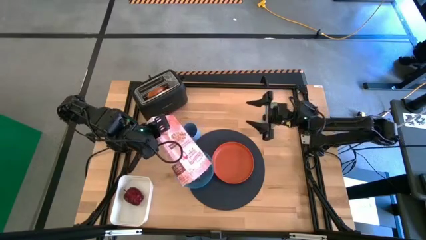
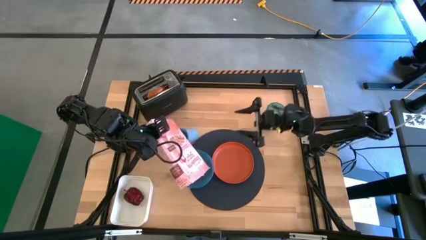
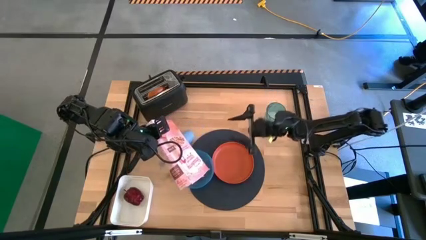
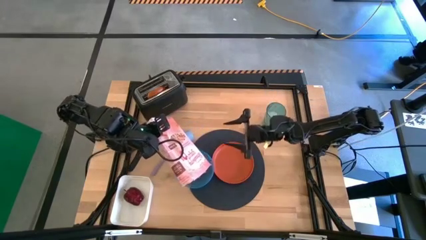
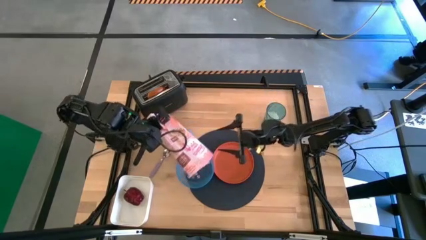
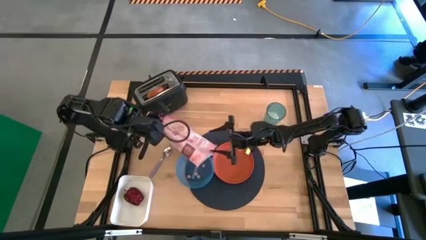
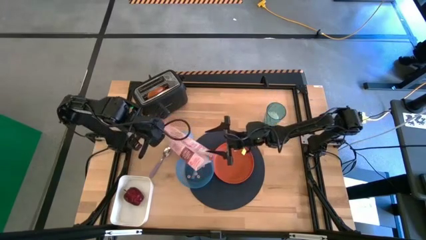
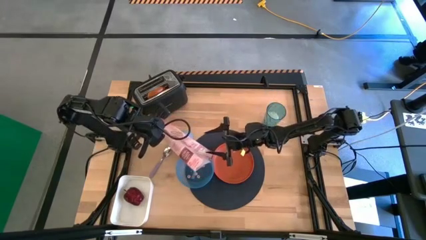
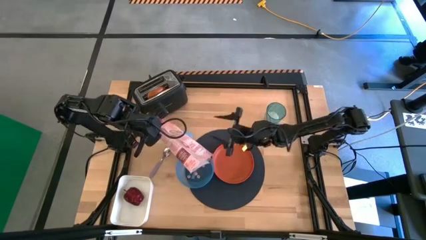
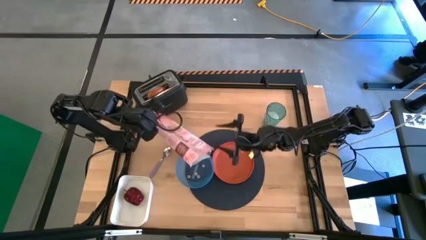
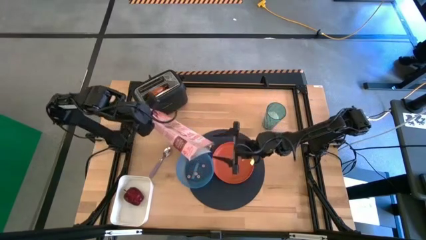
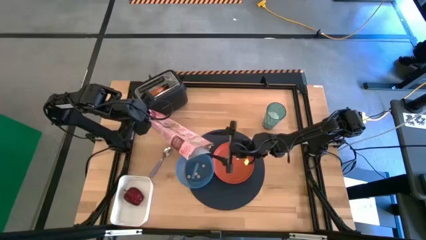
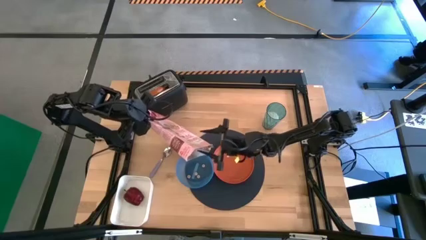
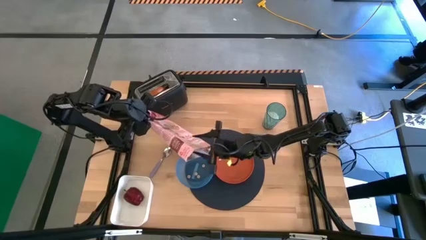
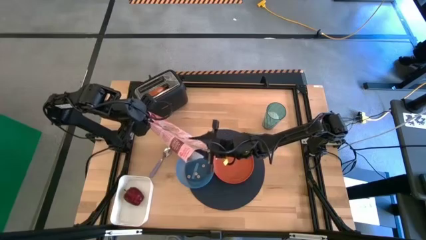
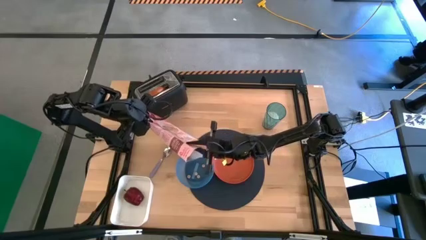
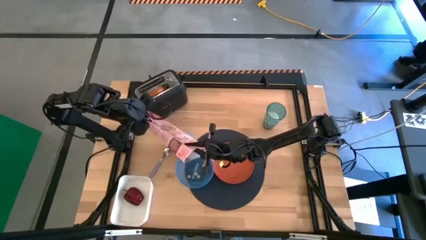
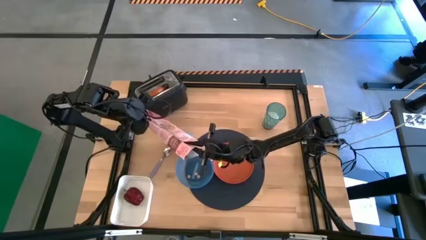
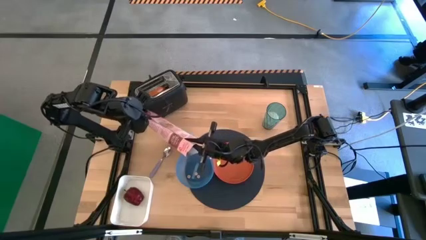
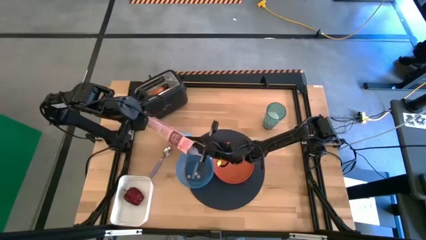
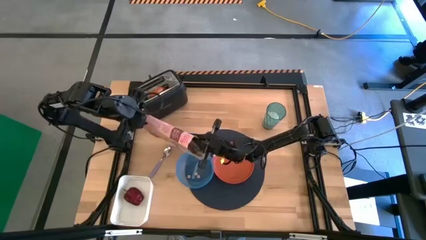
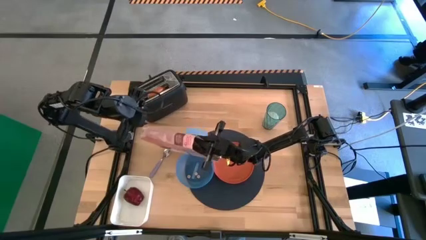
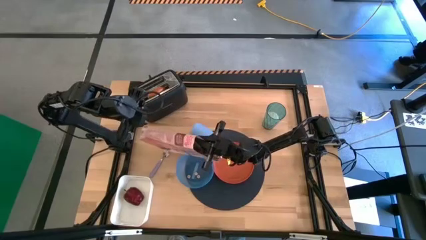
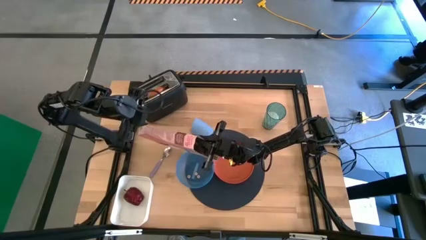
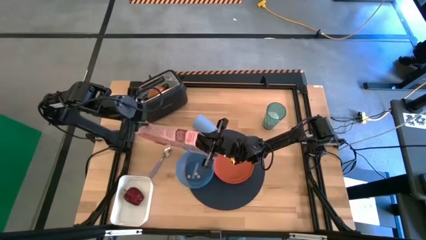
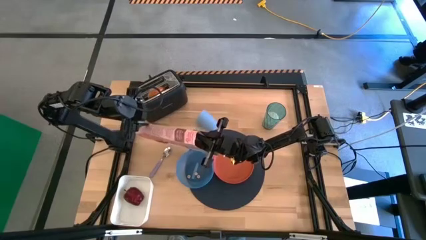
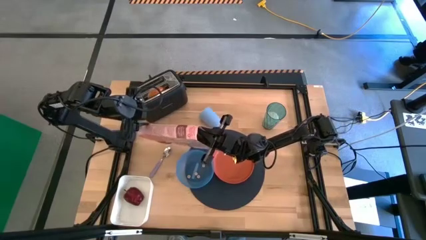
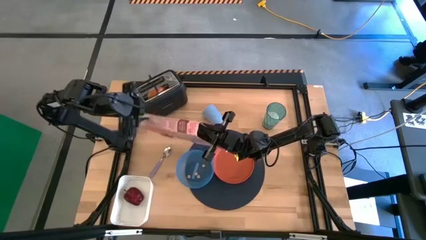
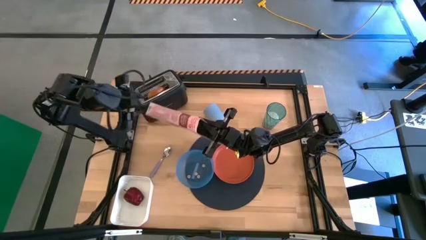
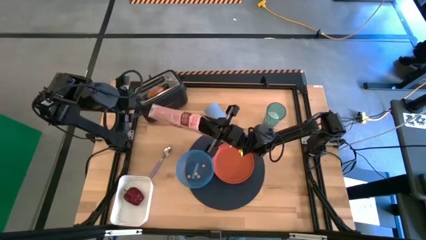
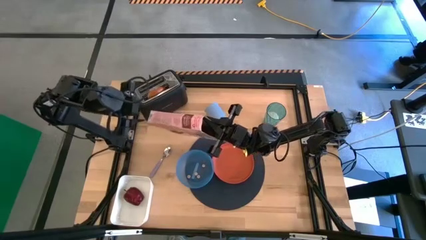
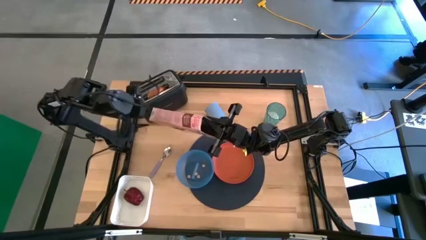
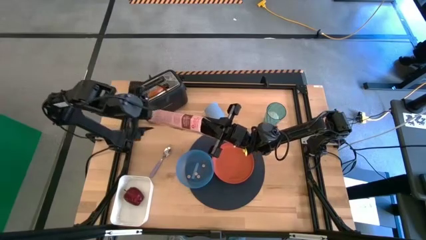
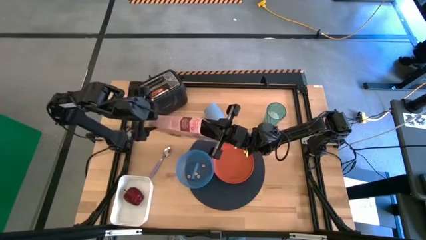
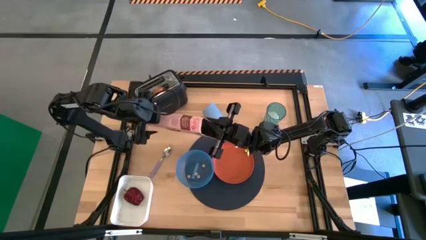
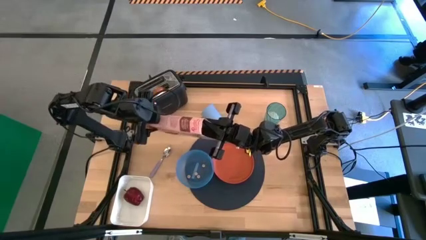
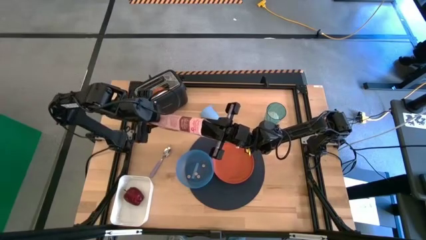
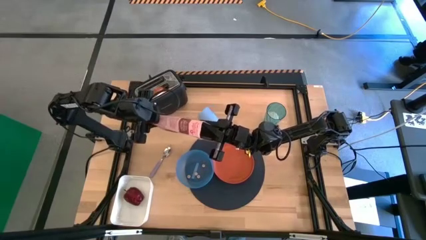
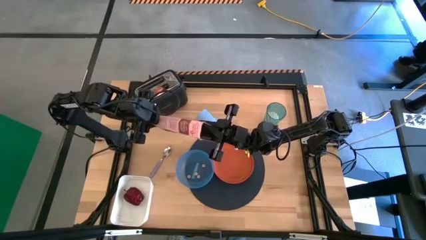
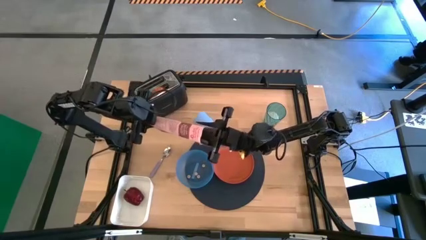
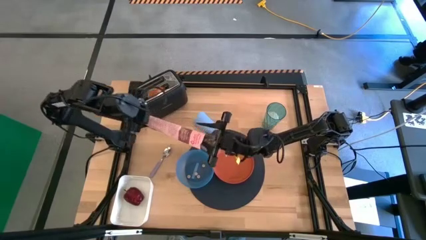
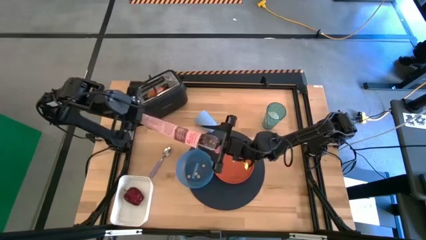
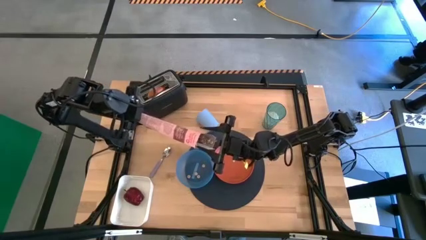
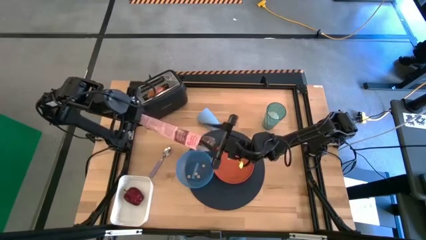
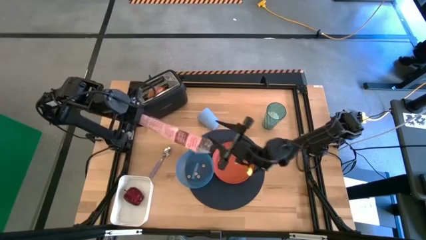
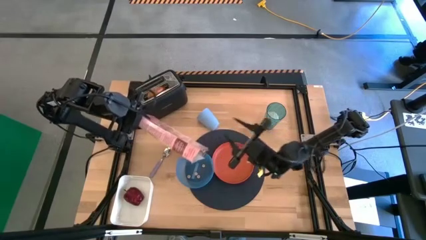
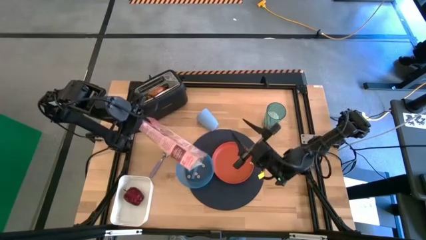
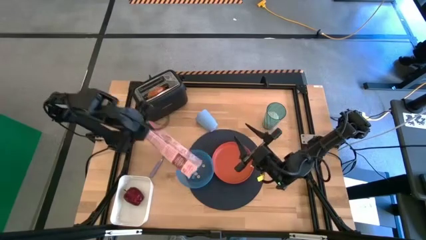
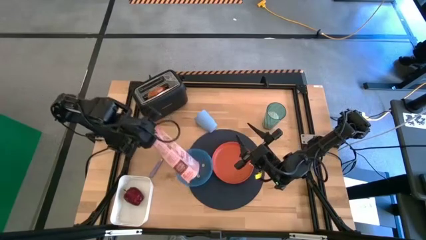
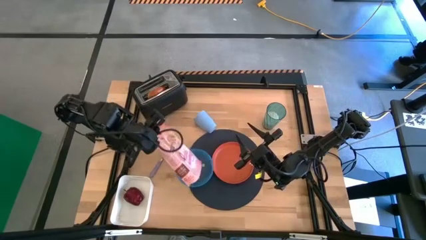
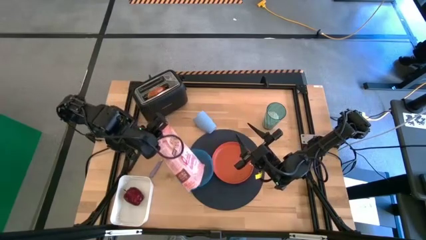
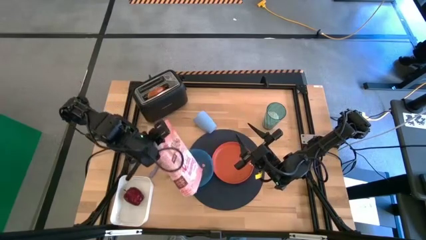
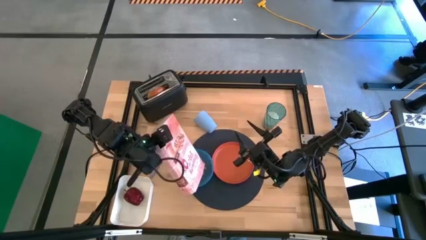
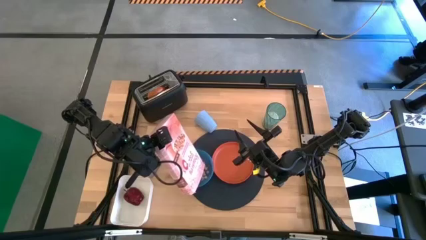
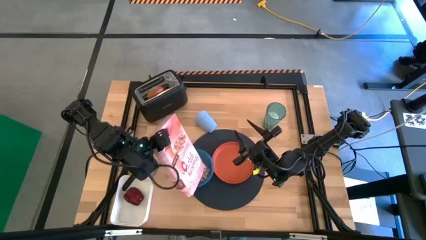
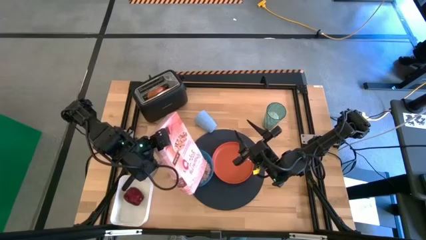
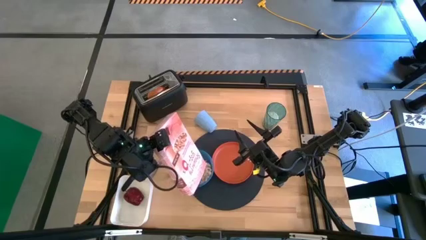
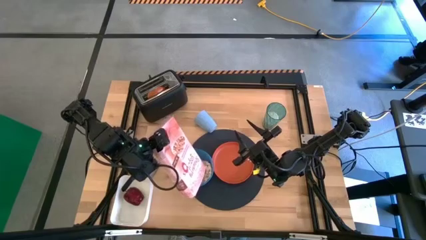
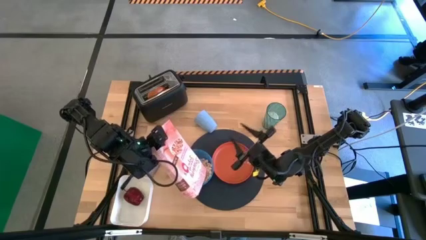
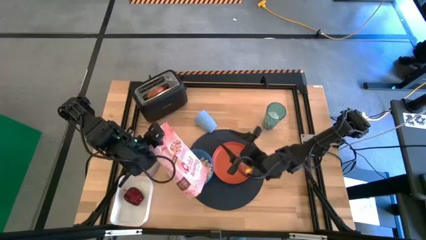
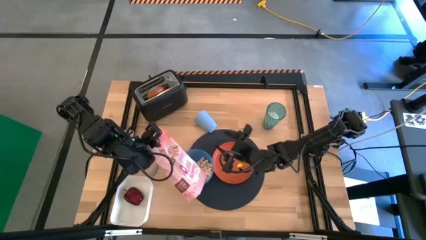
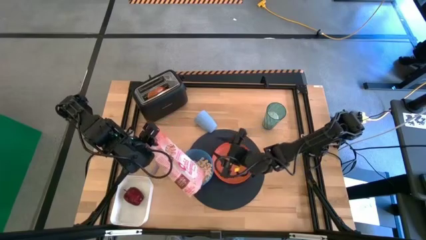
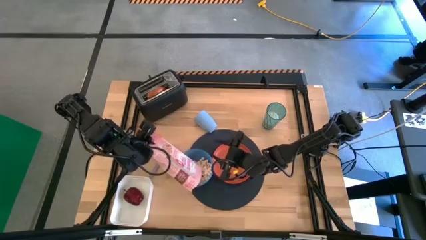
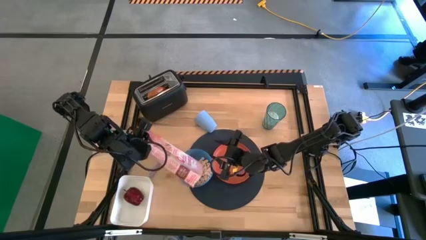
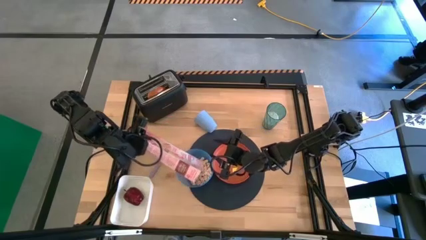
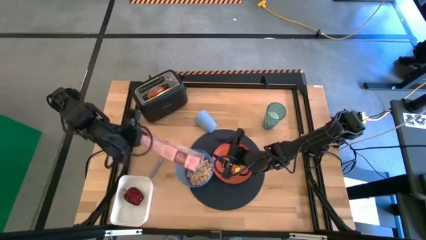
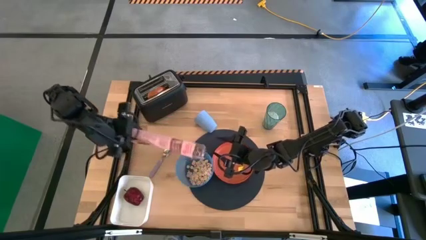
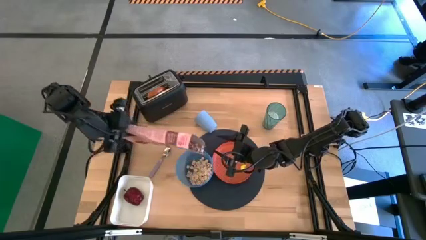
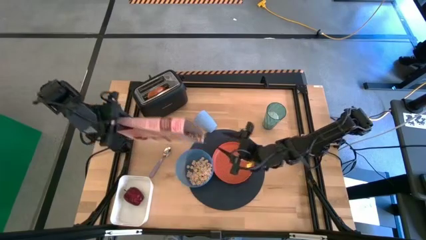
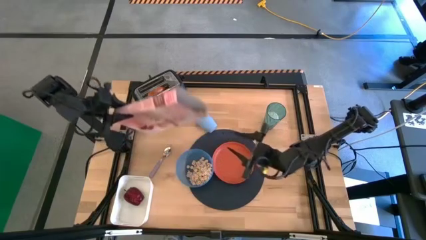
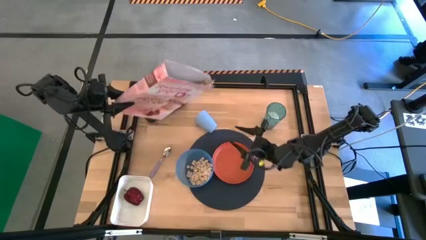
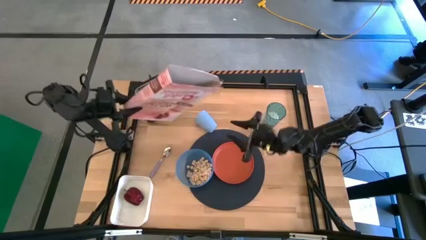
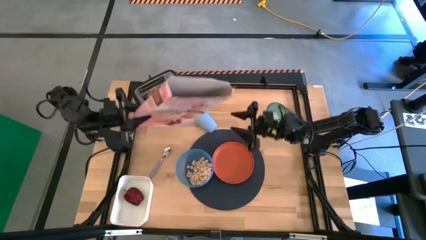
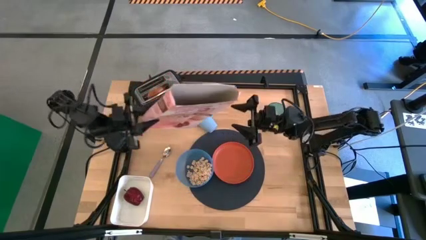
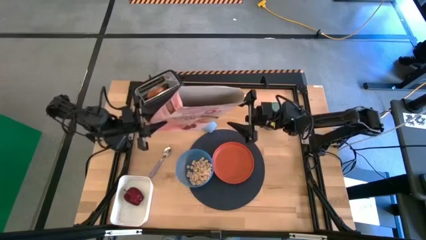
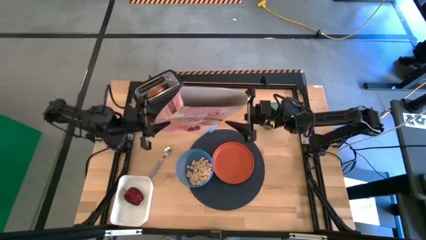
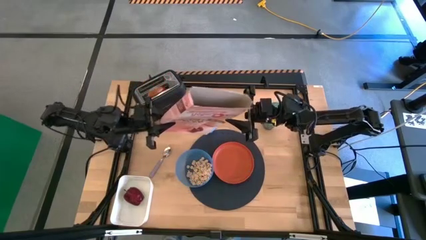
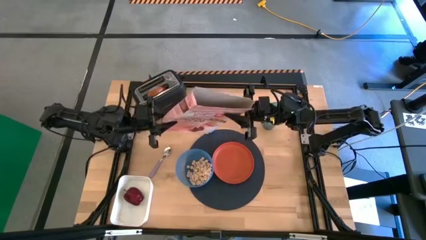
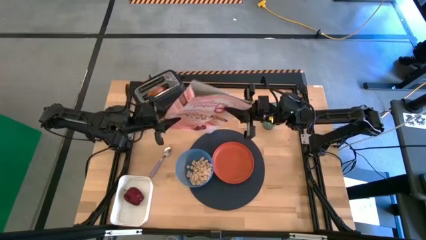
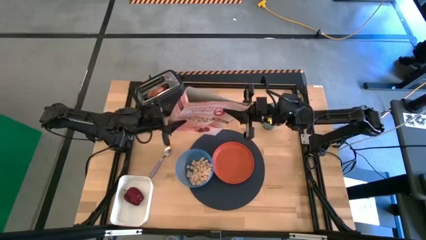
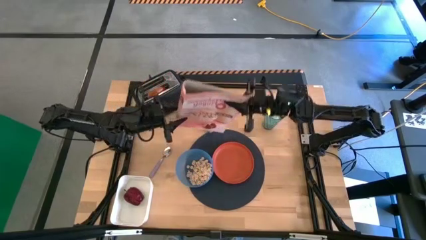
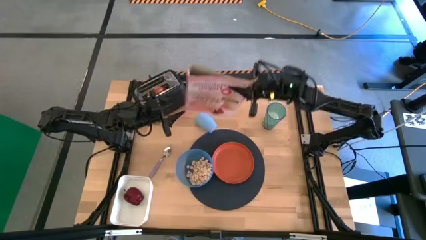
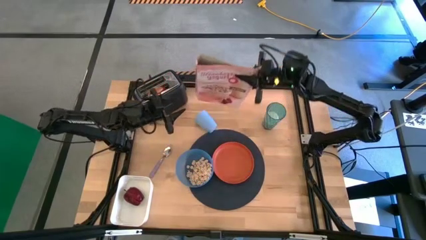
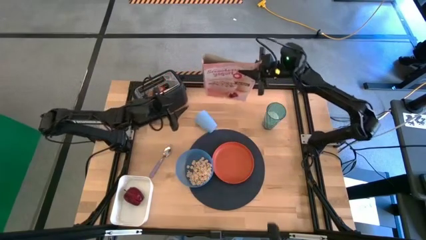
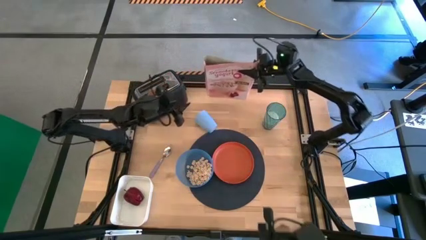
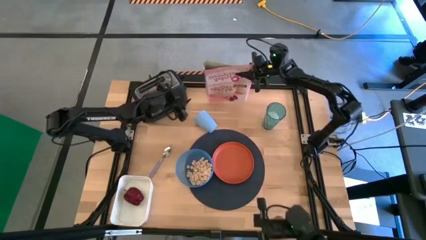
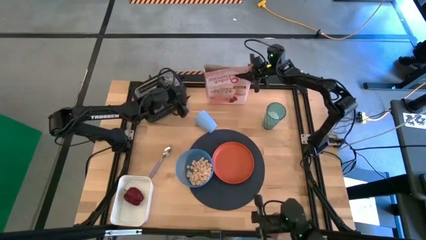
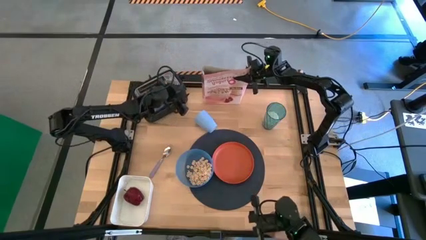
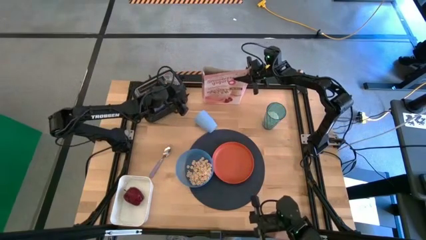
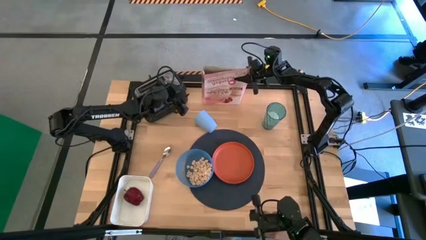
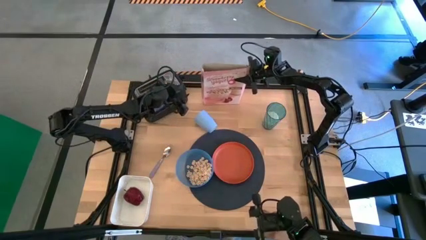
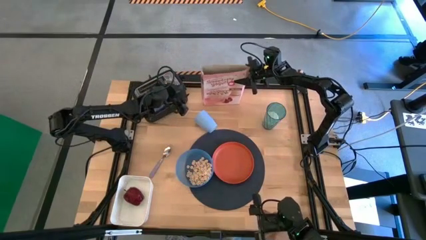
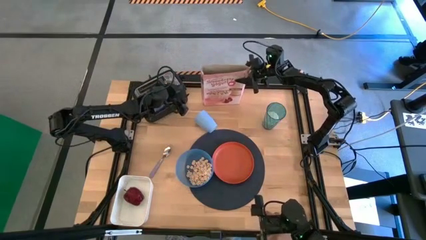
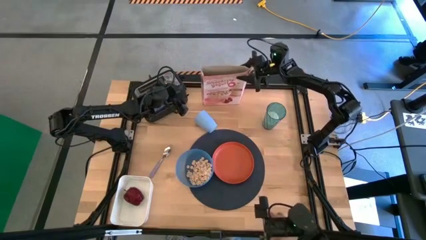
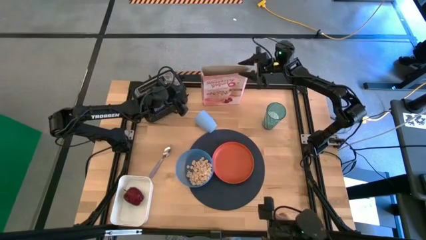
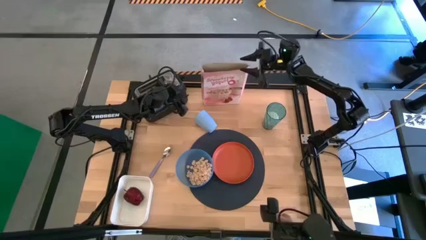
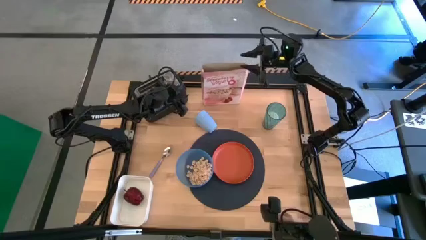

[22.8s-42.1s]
Task: Arrange a breakfast setting
Pour the cereal from the cereal box into a blue bowl
